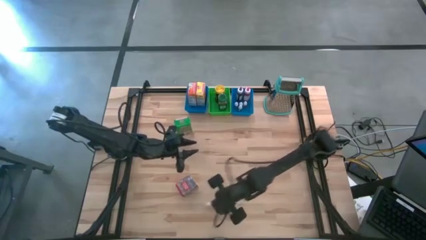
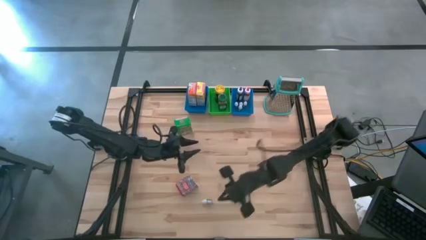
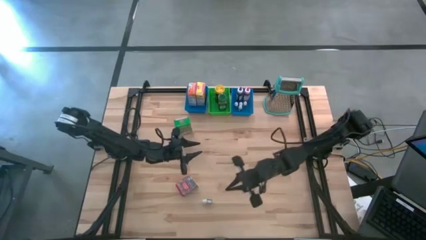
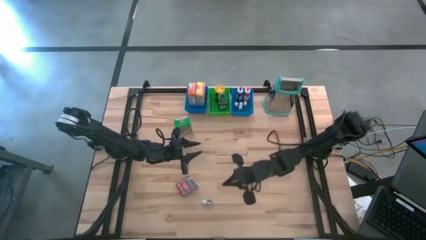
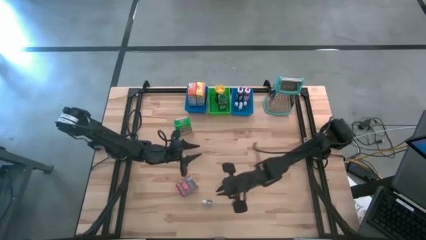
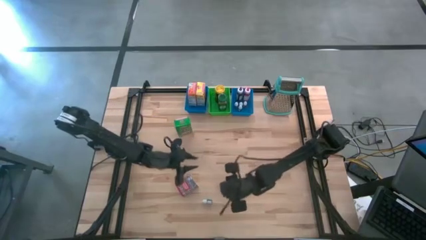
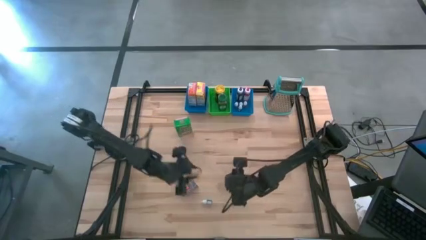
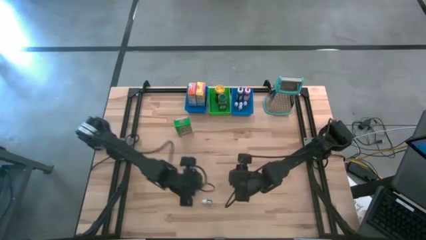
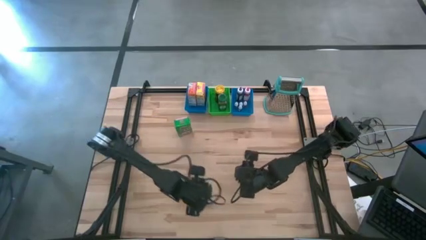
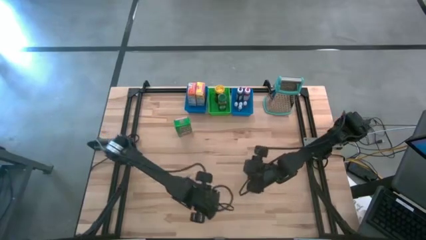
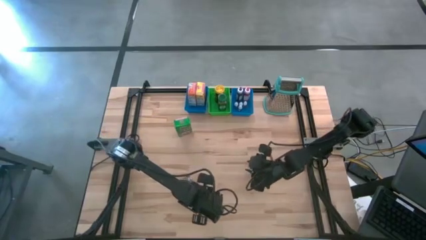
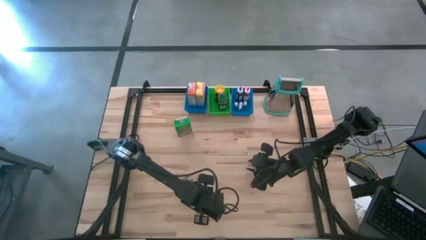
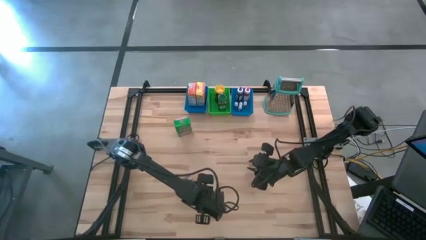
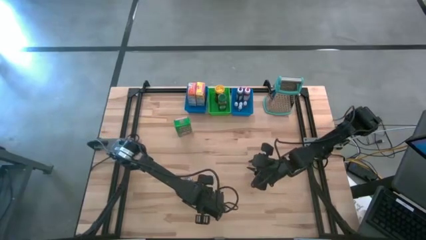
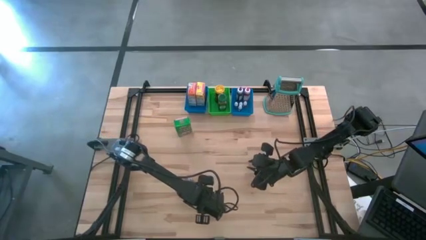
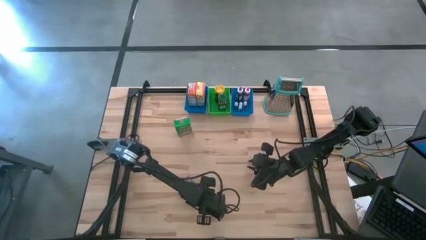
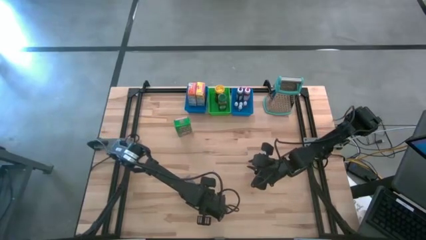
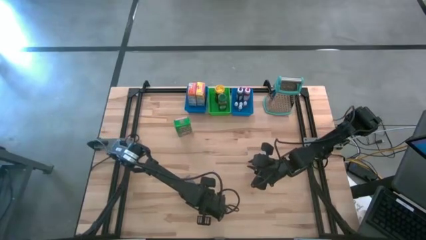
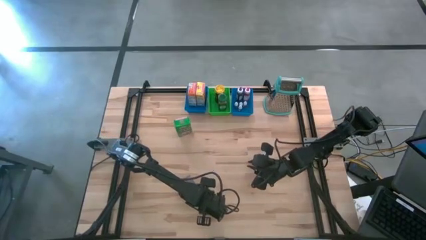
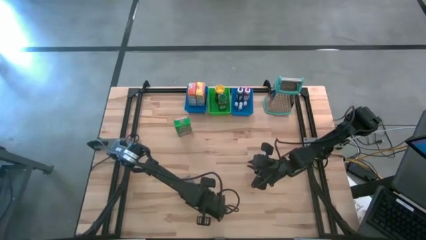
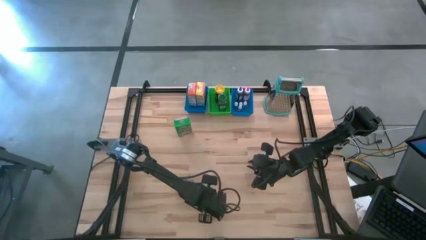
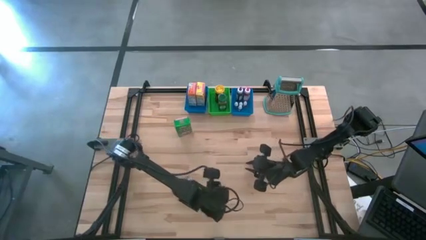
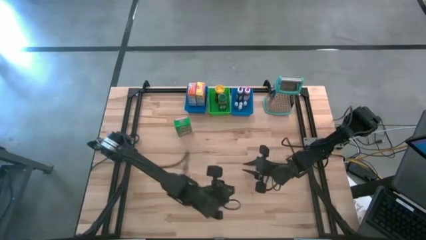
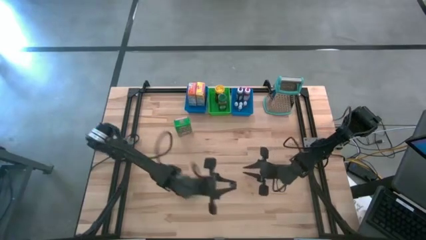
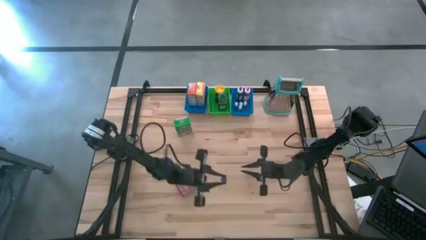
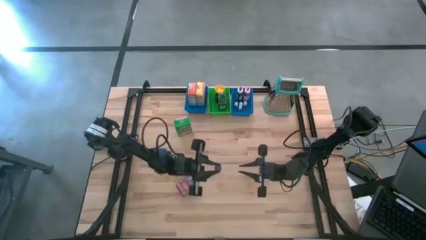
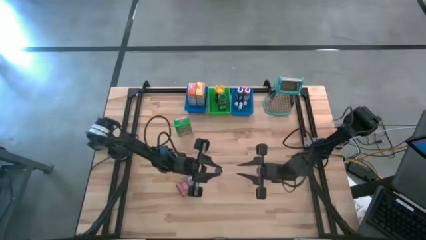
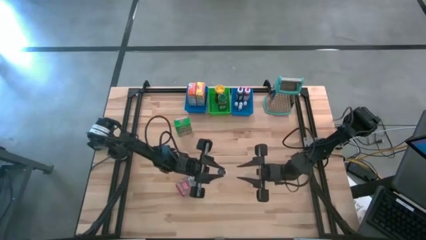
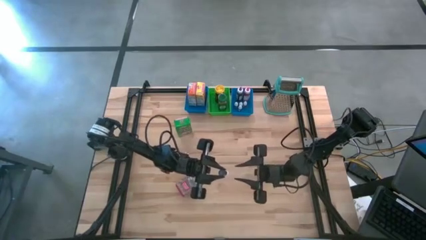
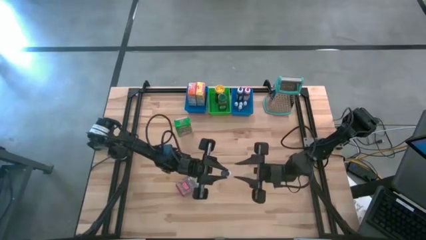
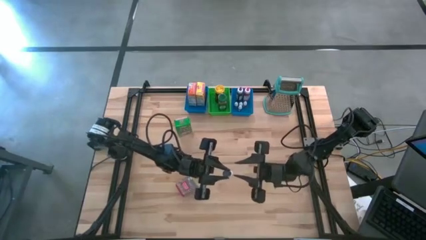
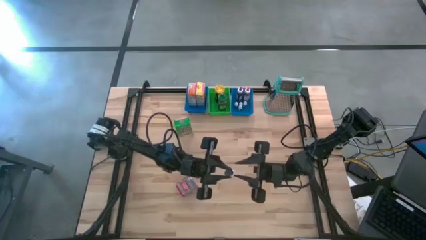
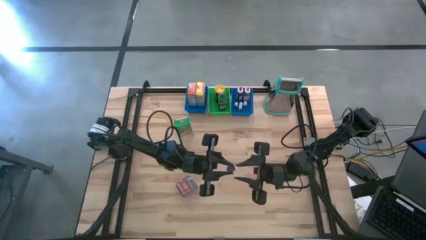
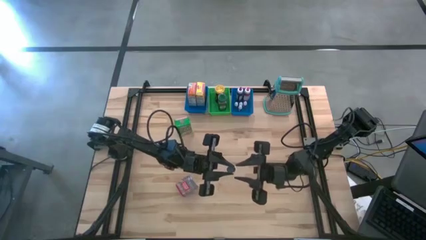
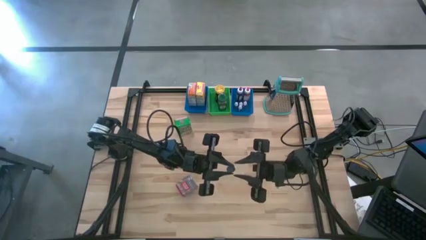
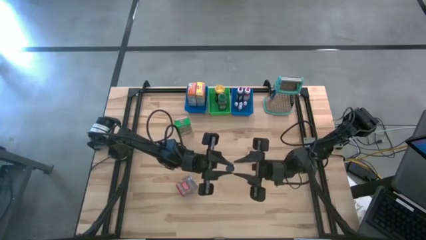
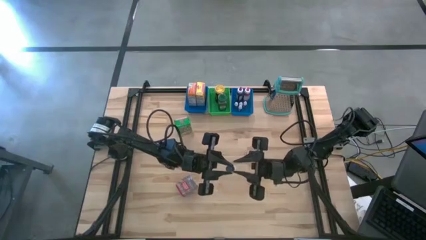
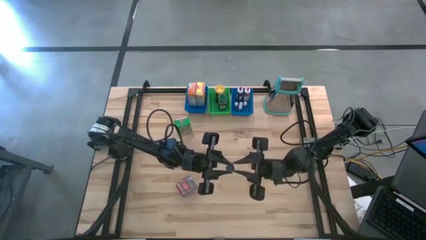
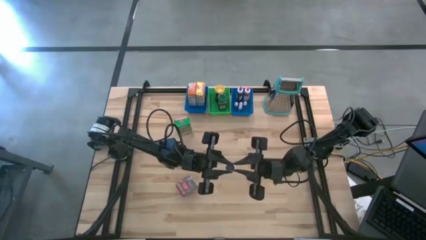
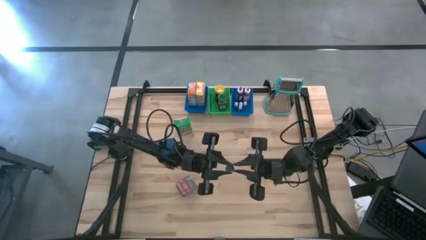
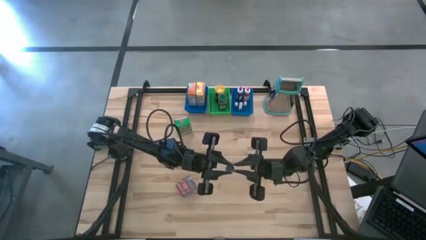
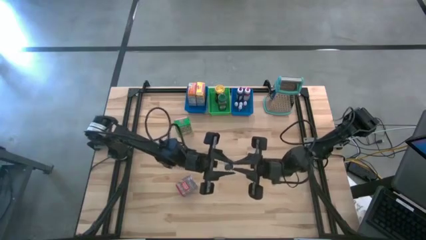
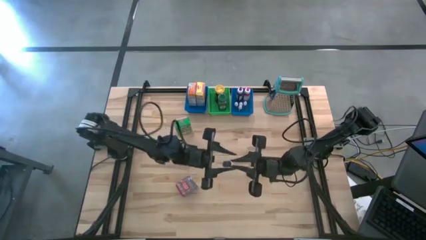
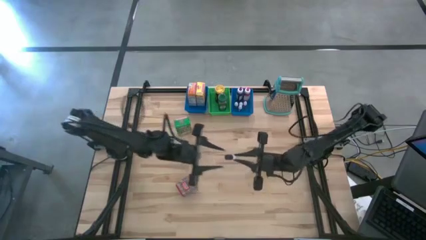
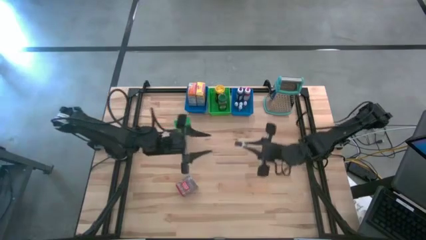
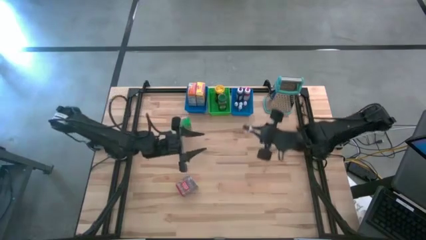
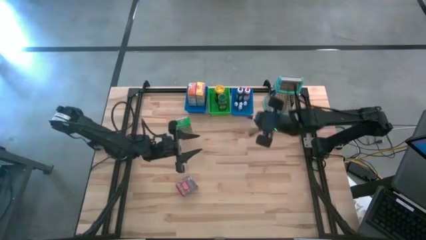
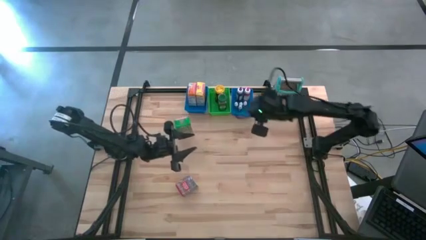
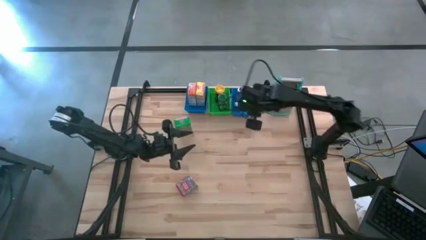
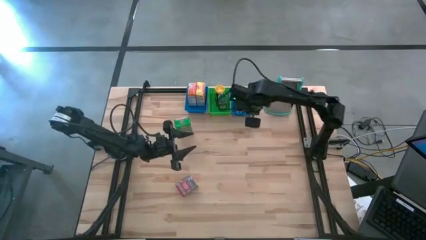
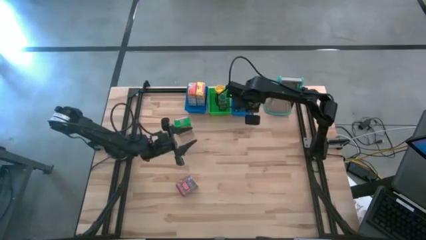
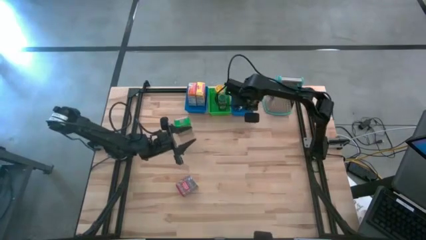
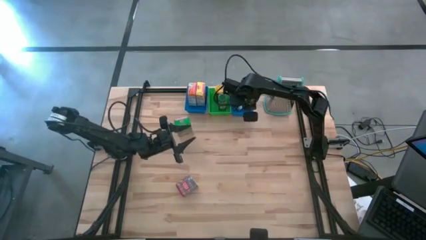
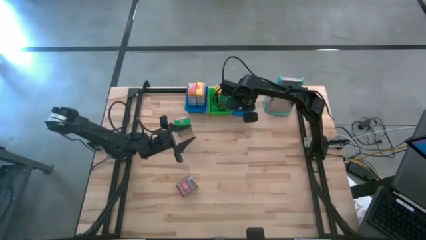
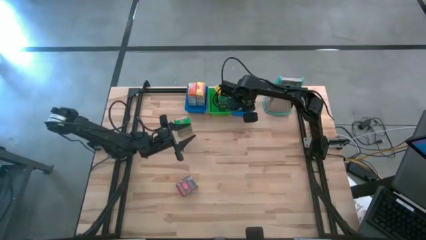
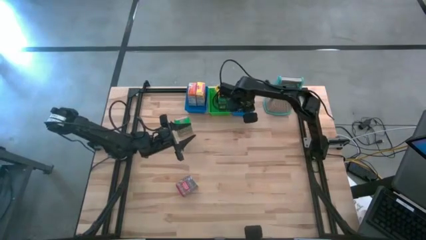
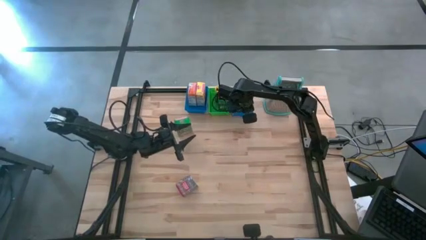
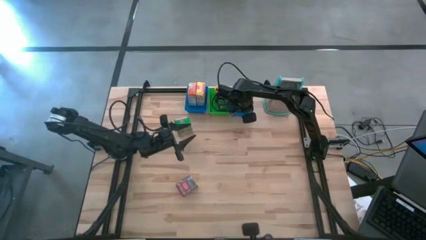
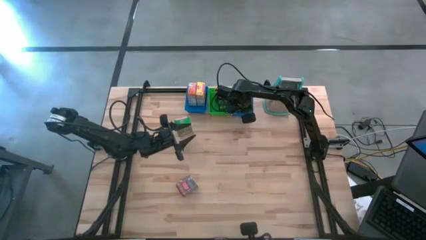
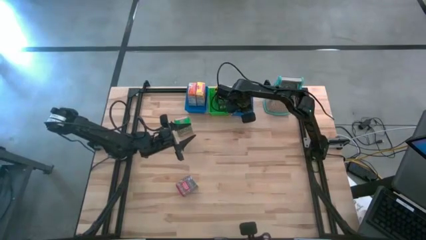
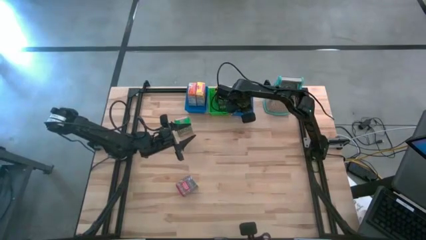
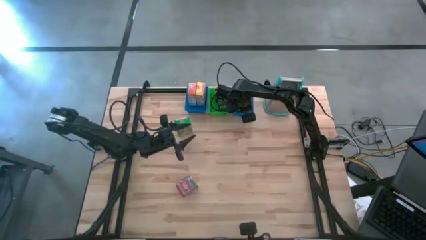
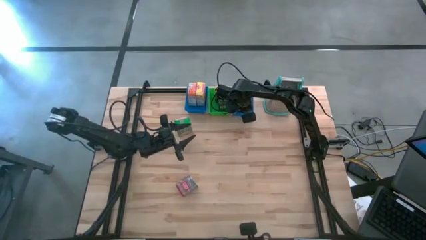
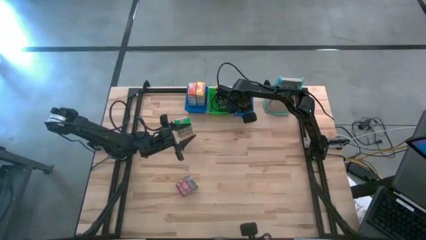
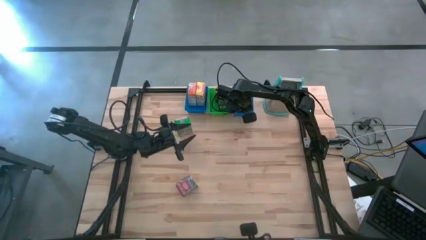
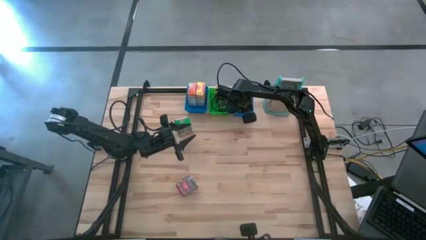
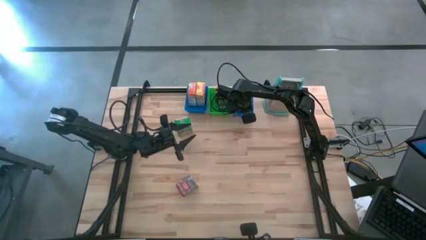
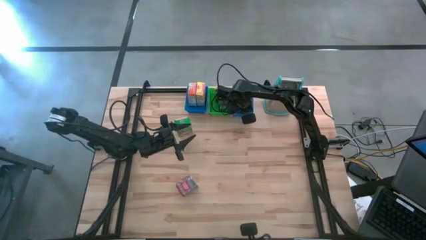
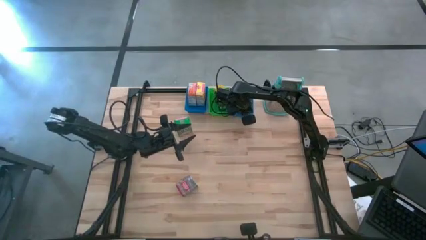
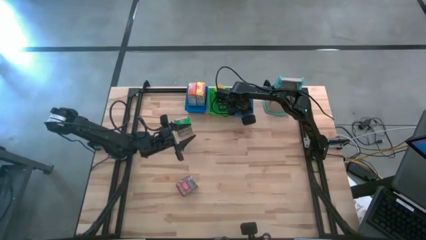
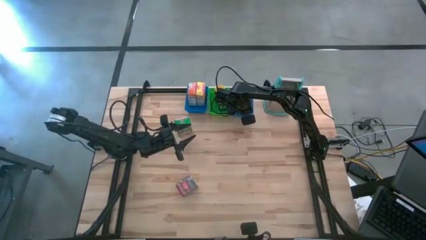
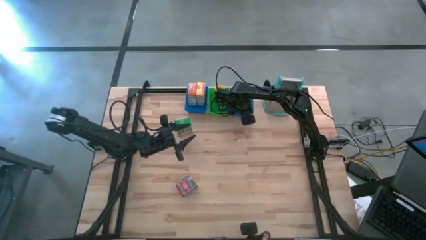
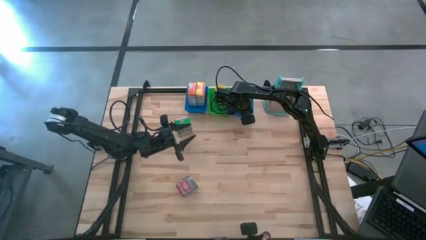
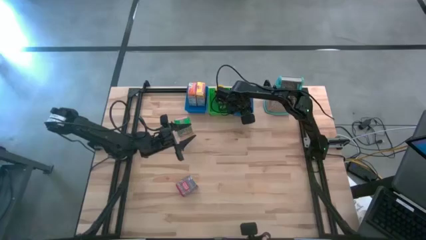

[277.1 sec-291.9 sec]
Task: Pick & Place Kitchen Items
Put the small purple food coloring bottle into the right blue bin

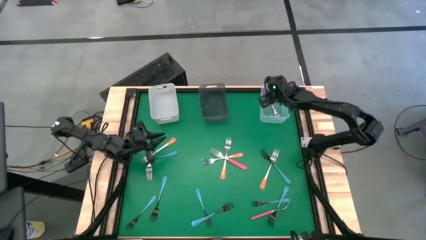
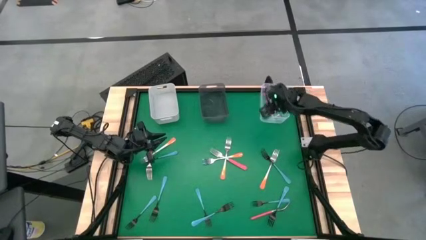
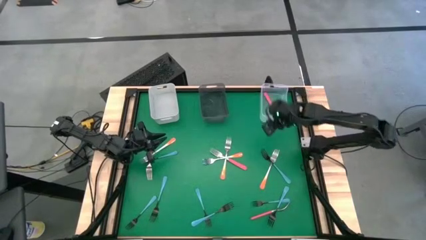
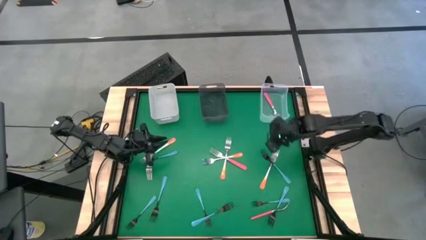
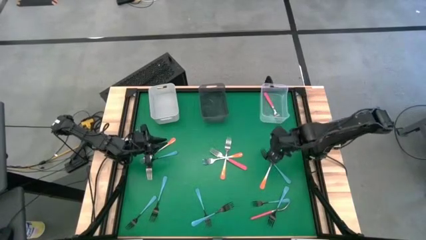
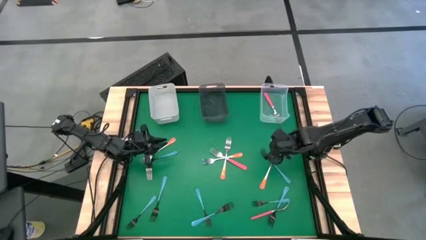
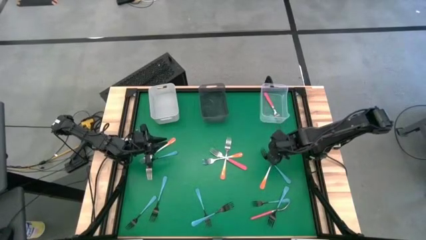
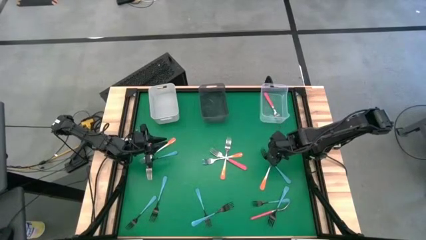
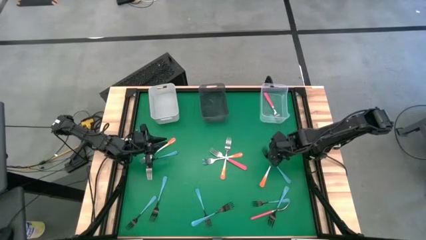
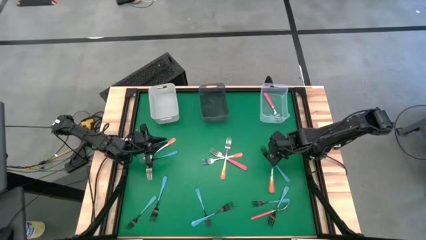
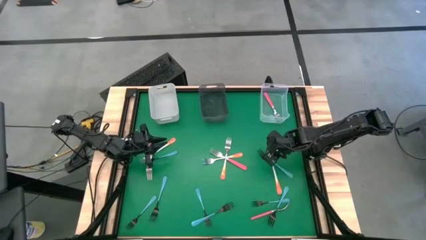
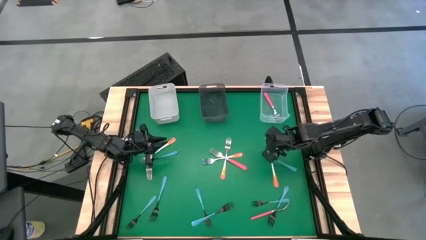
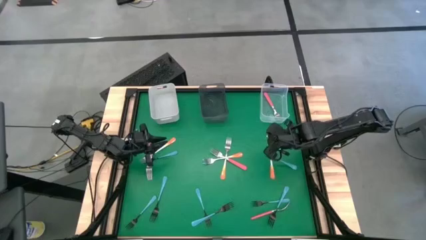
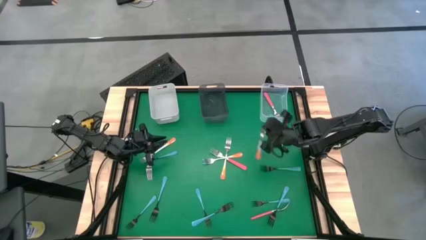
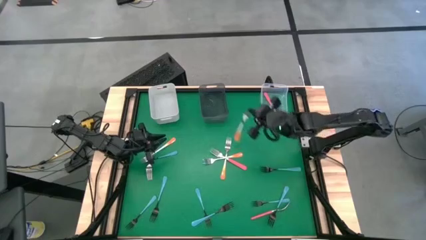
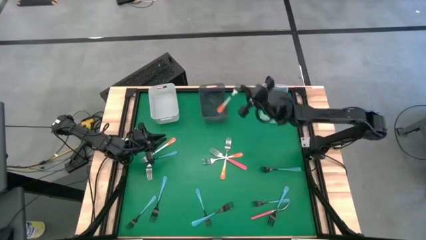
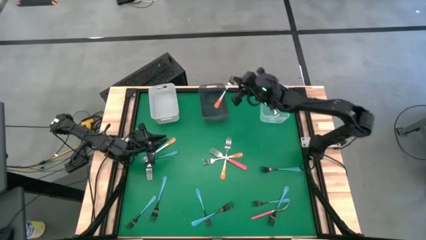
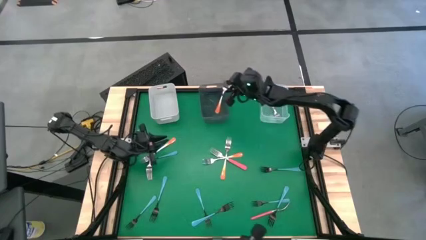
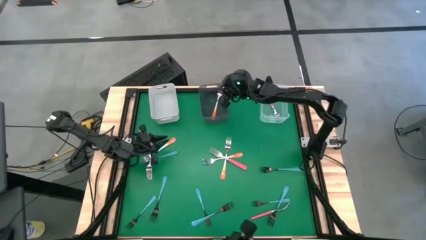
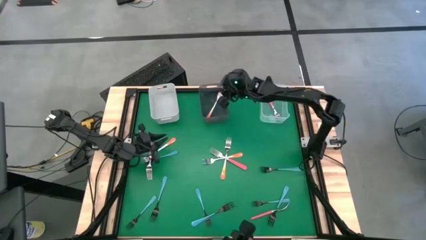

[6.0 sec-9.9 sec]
Task: Sort silverware by color (type)
Put the orange fork into the black bin
